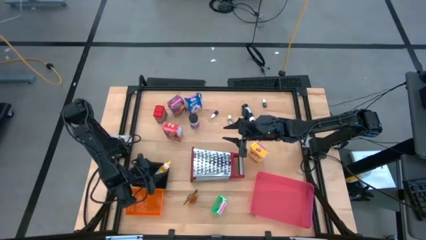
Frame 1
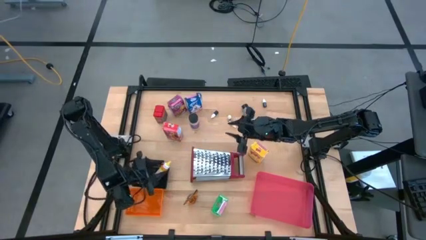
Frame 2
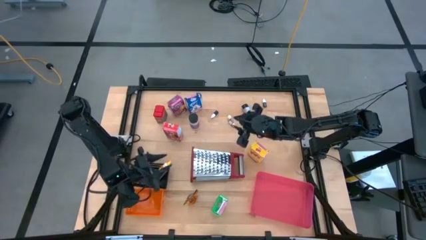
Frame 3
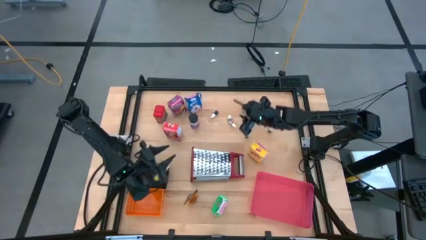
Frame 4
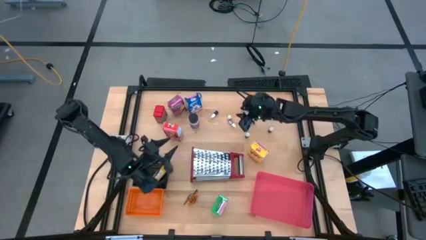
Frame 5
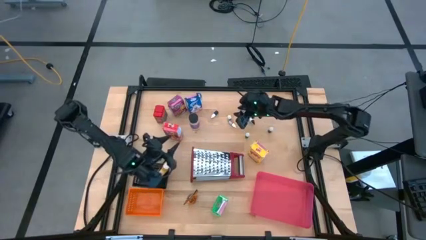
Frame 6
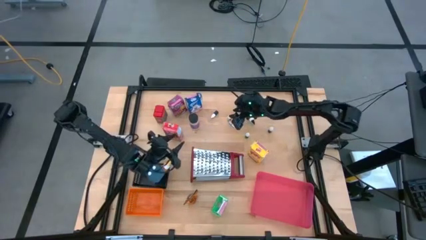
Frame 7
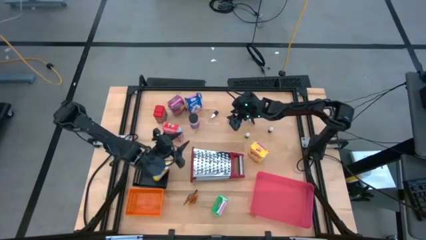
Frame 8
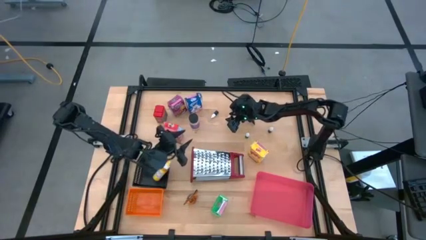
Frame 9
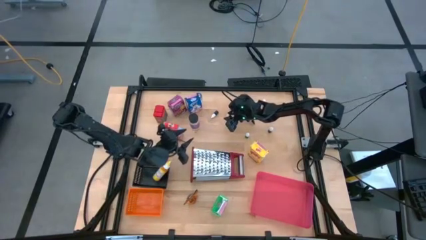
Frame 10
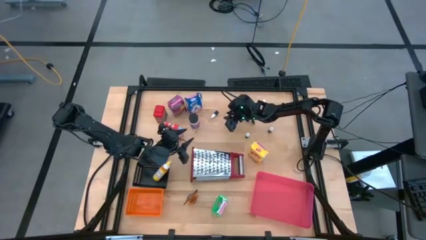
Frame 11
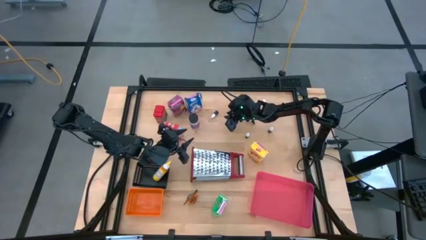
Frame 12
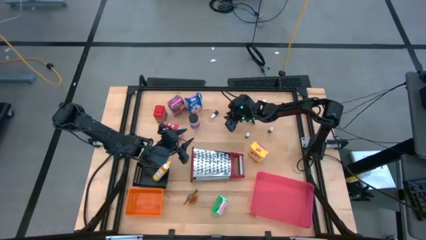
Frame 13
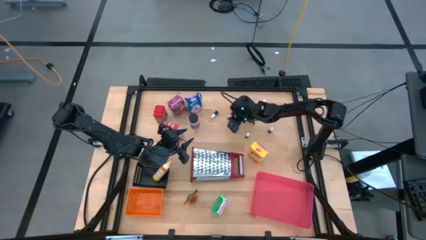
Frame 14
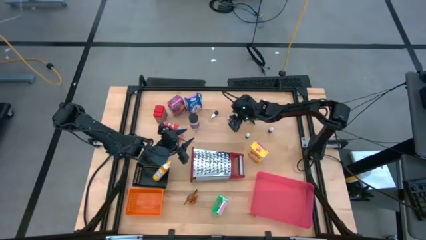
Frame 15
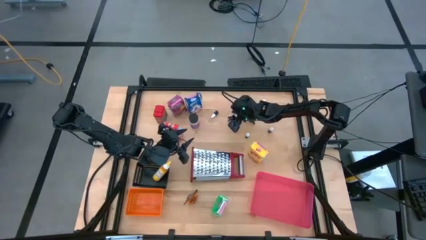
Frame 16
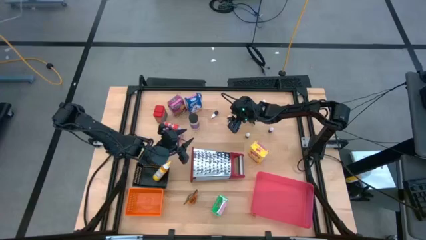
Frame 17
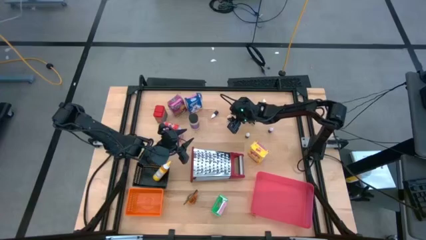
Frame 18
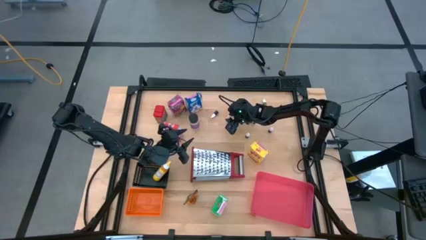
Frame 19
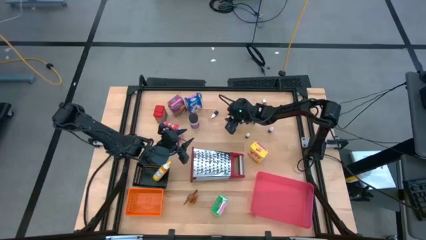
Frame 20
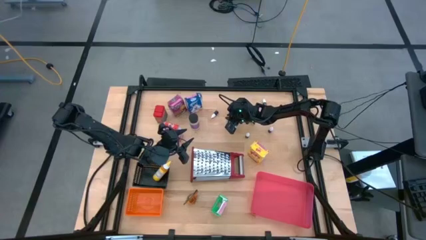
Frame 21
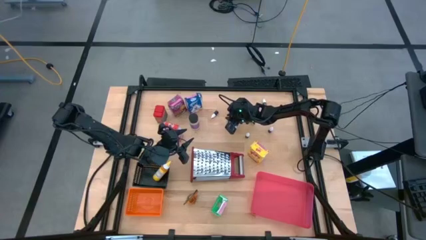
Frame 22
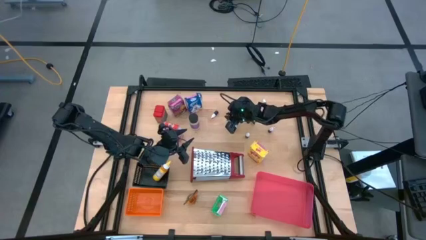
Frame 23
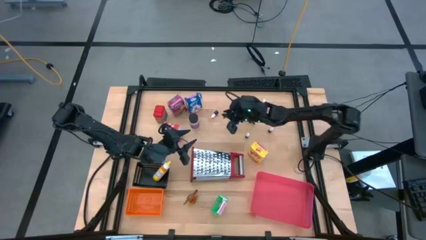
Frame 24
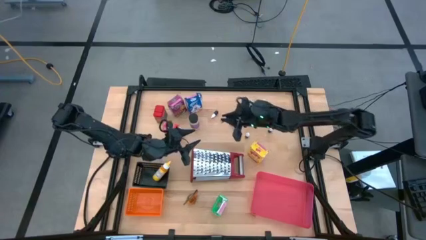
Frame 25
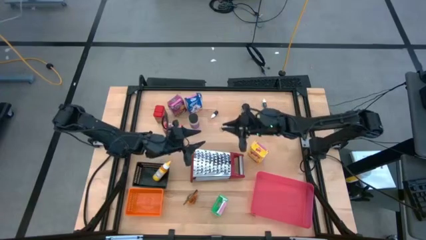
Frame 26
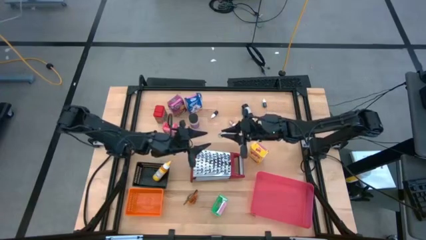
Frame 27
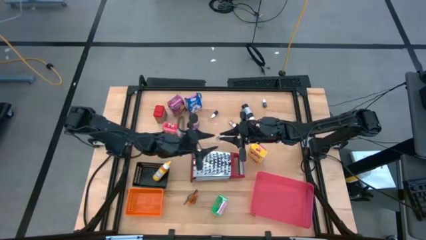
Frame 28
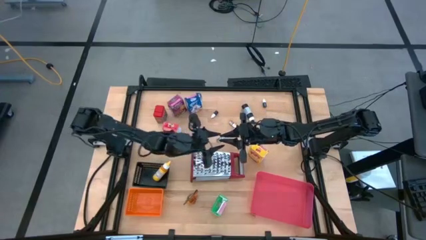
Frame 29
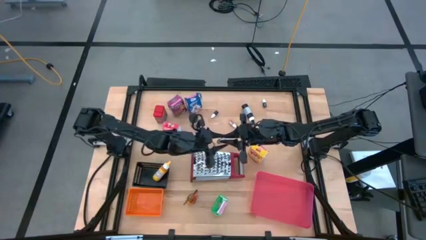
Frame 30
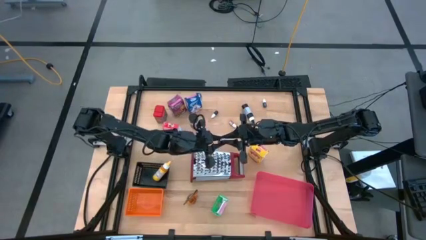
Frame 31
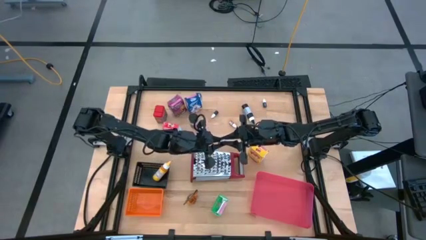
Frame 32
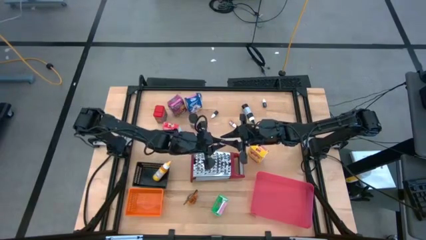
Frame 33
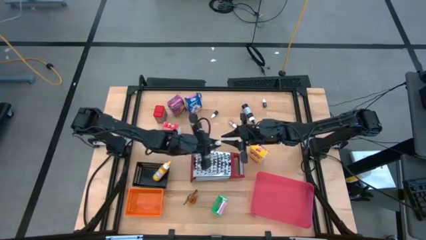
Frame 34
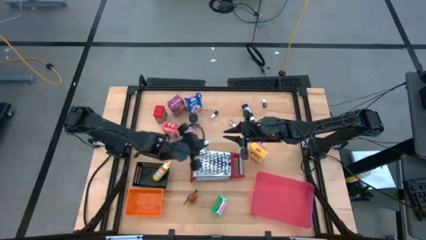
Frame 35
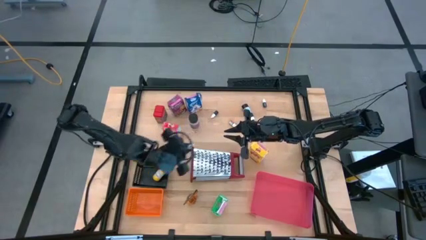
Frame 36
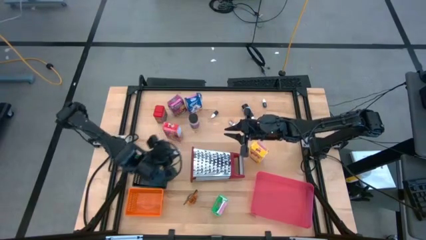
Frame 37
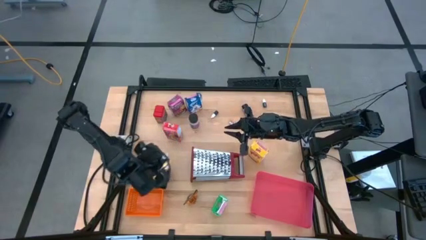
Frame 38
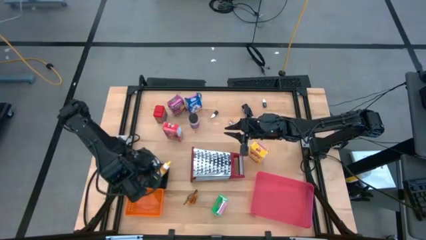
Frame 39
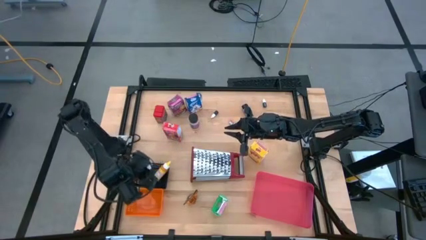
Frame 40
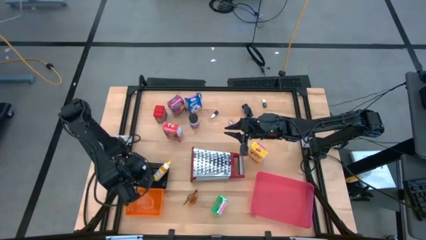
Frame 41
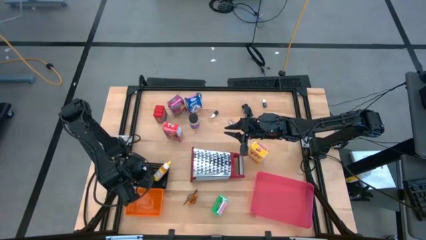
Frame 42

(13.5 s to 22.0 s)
Task: Pick & Place Kitchen Items
Put the small green food coloring bottle into the black bin

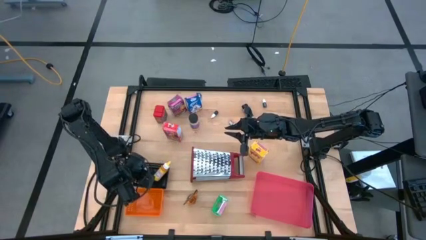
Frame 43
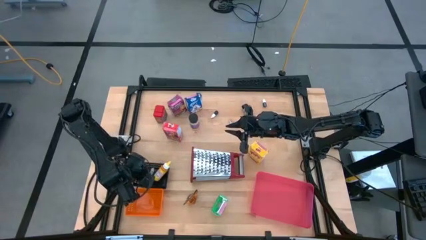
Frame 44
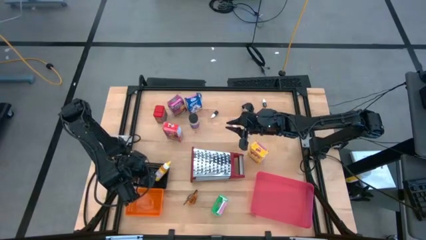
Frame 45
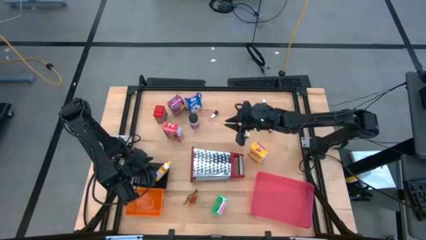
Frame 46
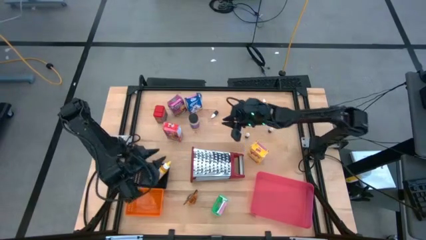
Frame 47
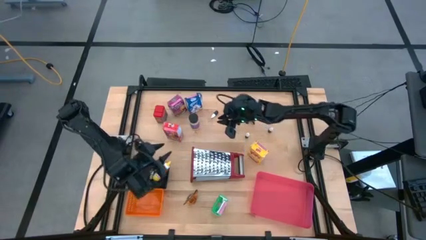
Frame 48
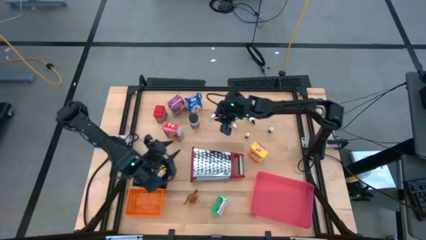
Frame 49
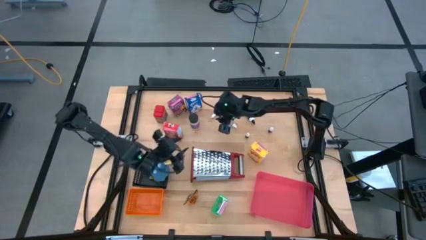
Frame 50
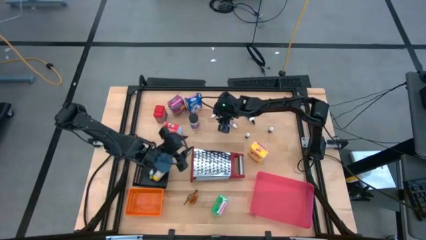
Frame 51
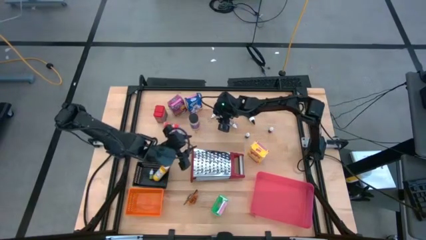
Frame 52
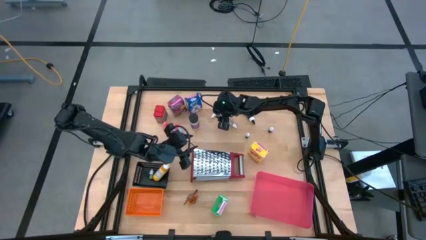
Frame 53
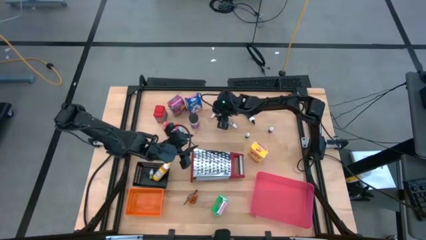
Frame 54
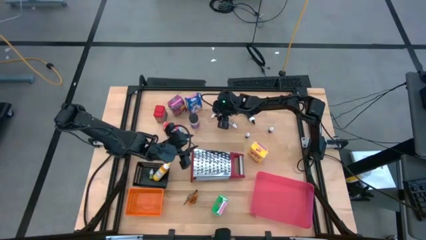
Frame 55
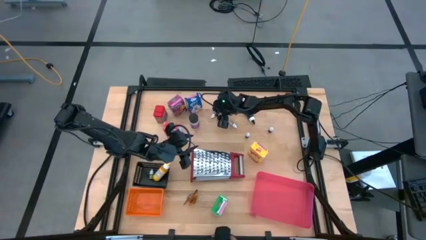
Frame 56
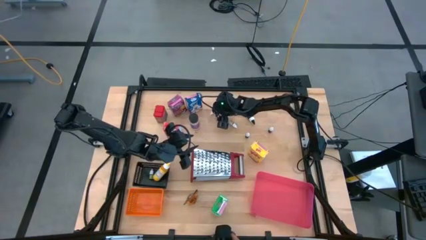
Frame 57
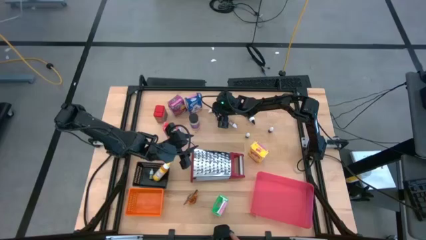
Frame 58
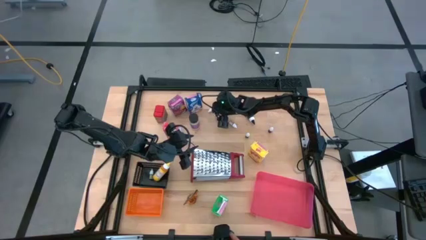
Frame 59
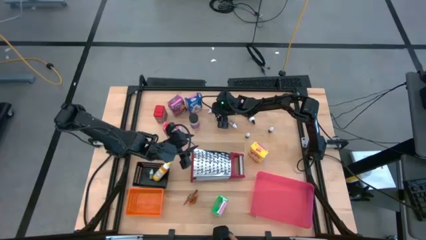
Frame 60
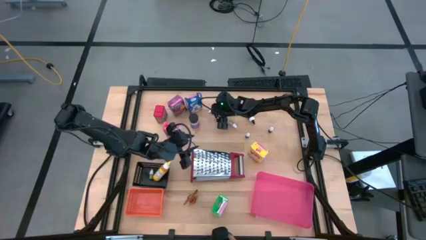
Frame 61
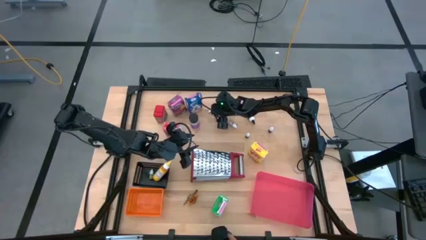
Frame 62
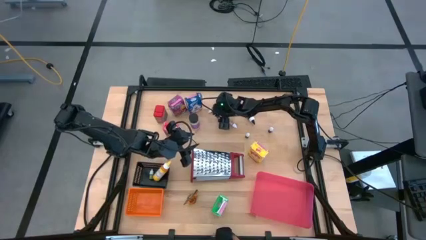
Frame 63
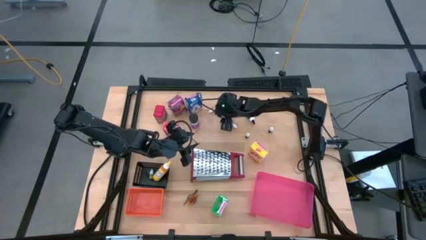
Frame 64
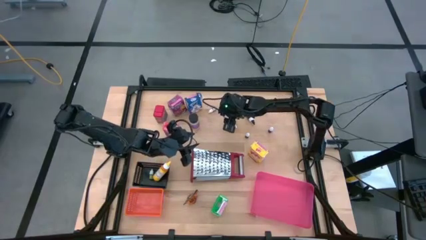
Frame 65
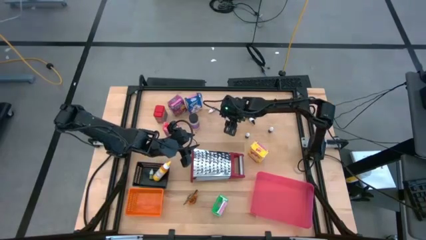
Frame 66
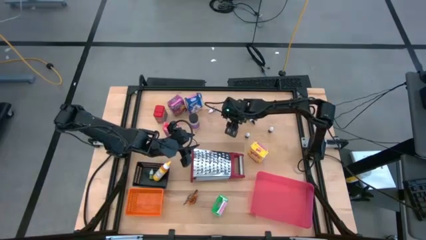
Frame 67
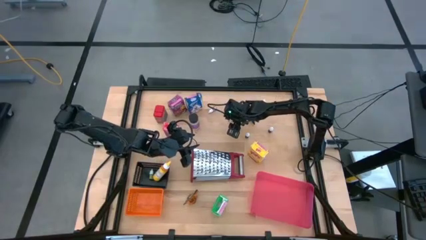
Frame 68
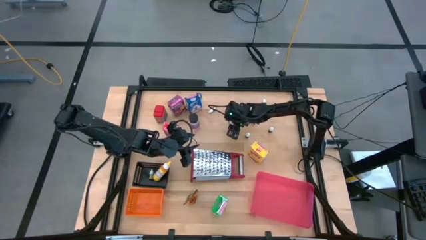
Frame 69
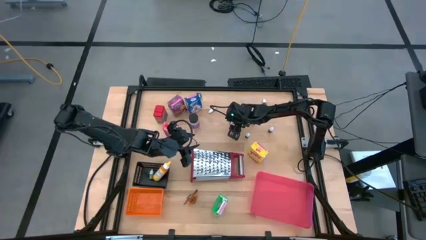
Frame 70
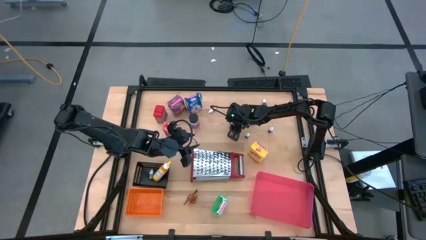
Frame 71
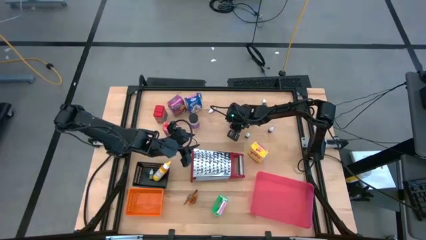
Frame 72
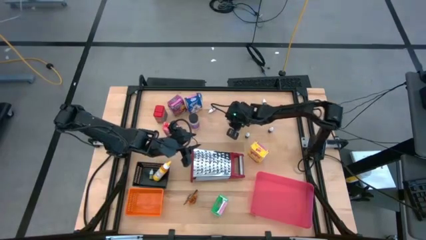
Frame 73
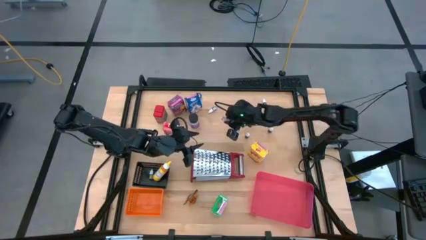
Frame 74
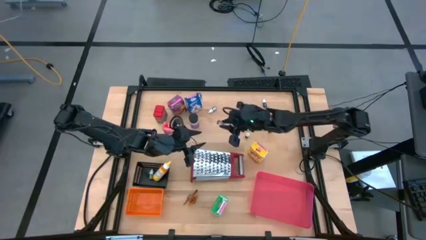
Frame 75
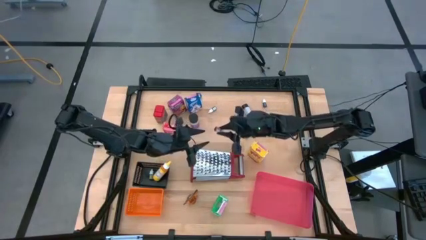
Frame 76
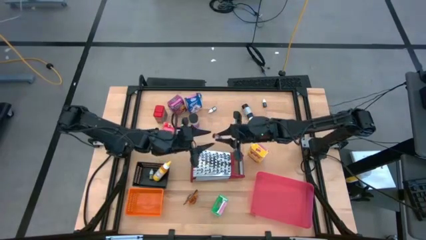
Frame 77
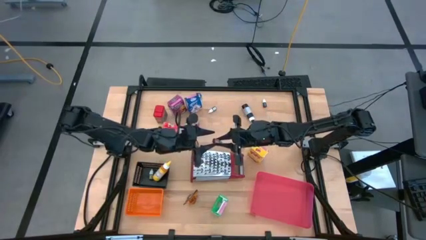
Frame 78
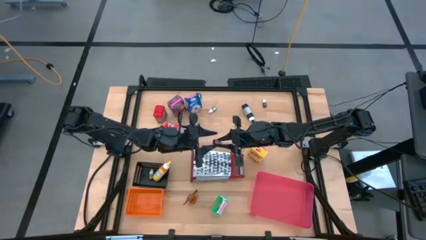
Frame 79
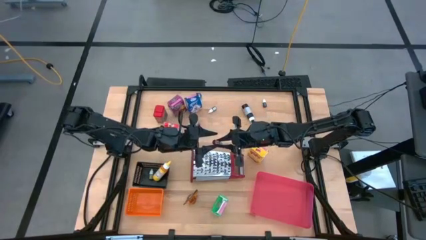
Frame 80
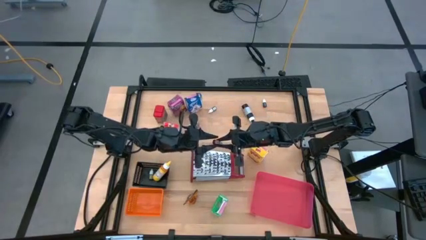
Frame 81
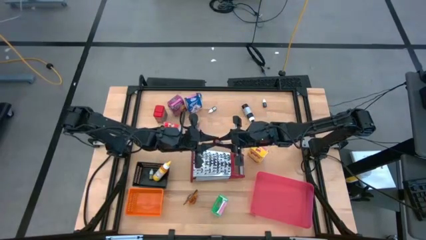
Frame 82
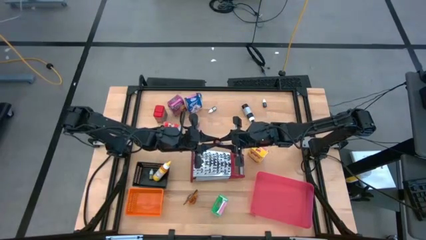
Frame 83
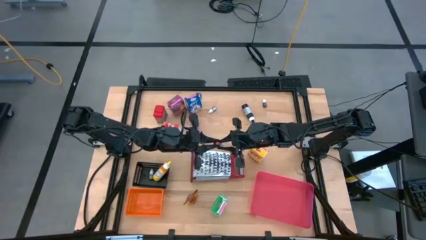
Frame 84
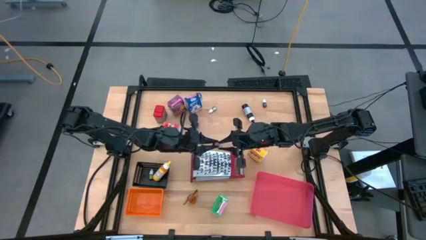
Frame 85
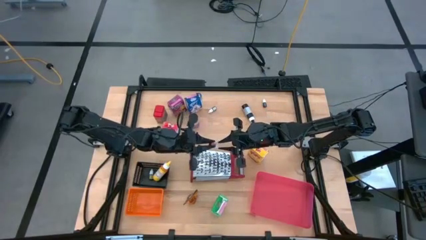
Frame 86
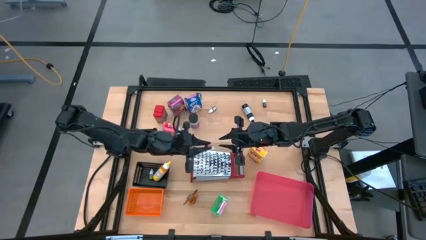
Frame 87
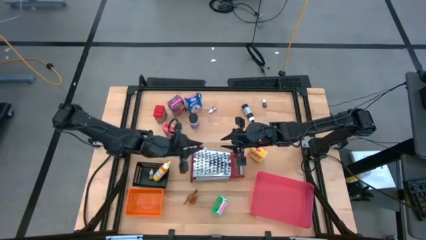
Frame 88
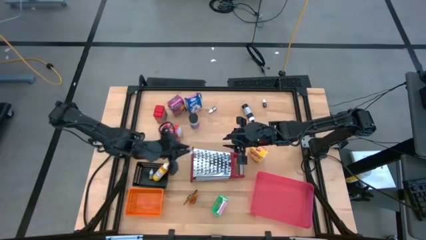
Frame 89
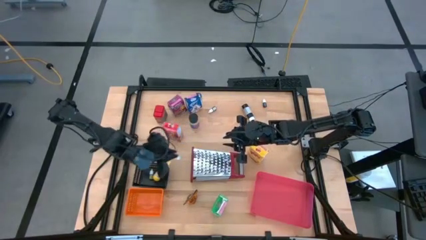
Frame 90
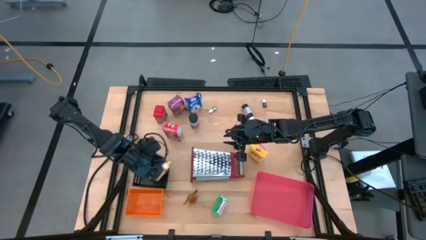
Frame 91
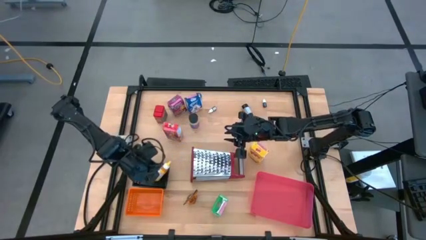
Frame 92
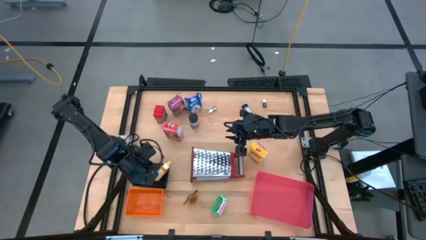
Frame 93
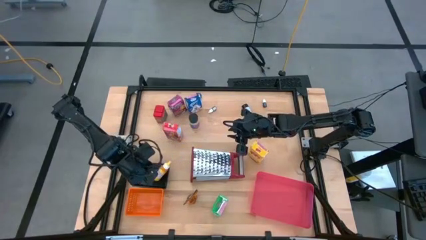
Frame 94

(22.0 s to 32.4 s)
Put the small orange food coloring bottle into the black bin
